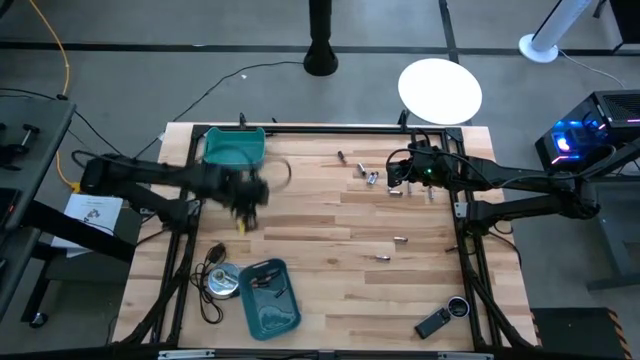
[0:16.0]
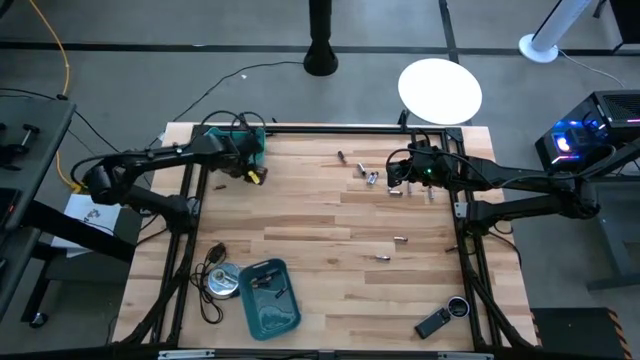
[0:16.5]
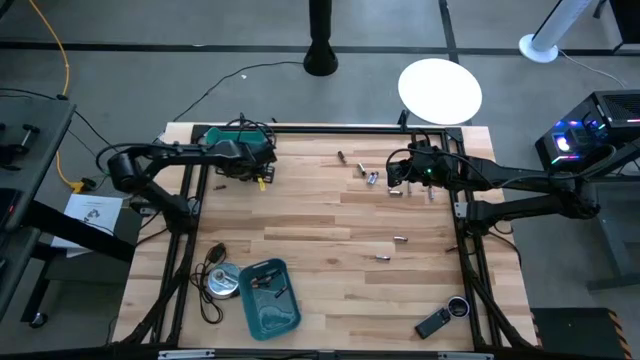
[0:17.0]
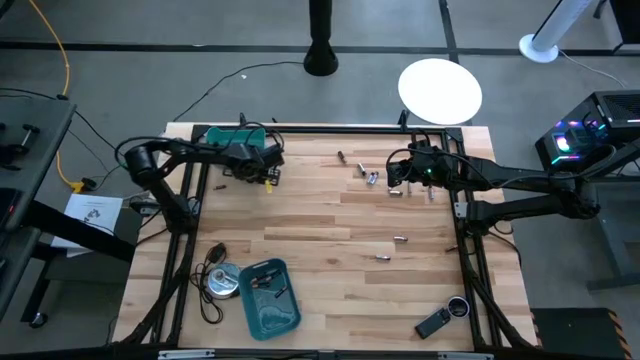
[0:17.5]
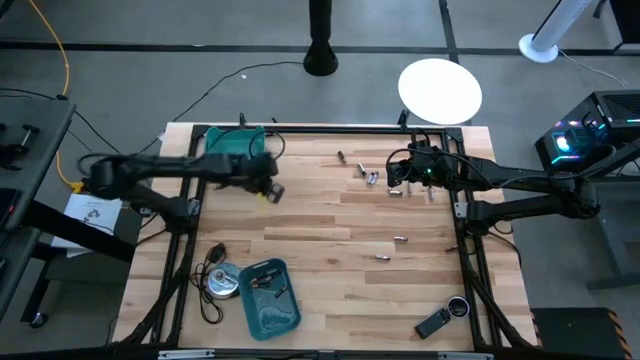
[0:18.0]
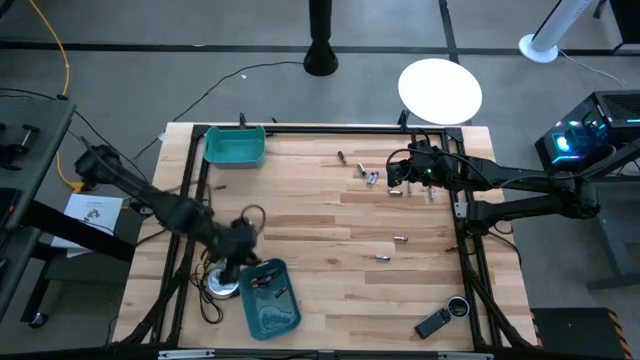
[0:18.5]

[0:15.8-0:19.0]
Task: Sort batteries
Put the black battery into the blue bin

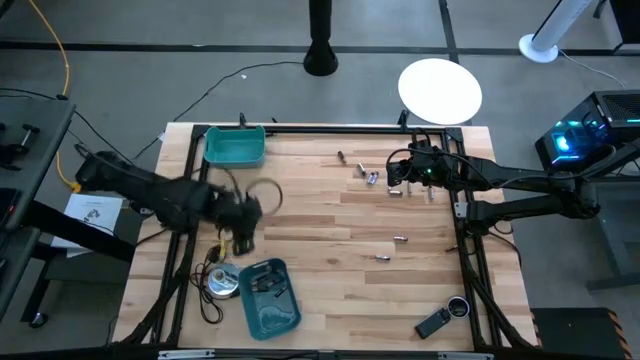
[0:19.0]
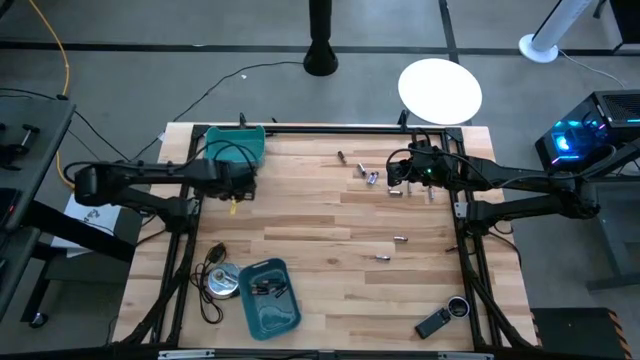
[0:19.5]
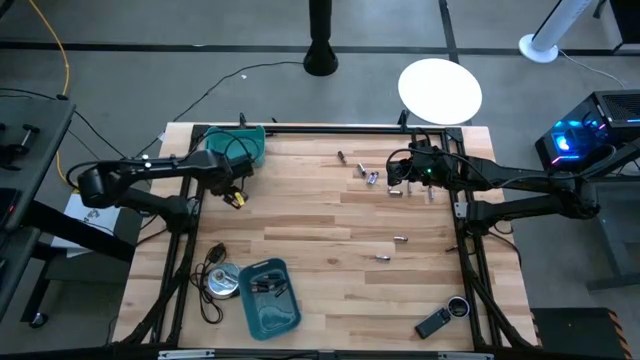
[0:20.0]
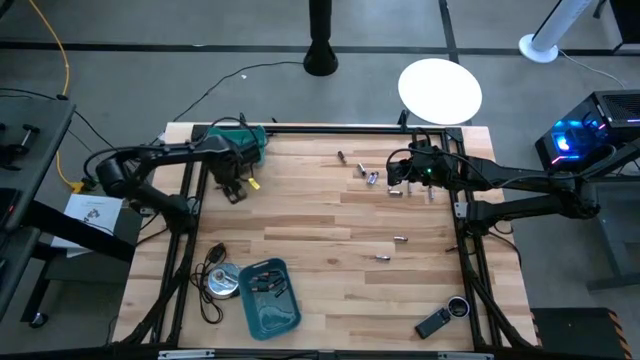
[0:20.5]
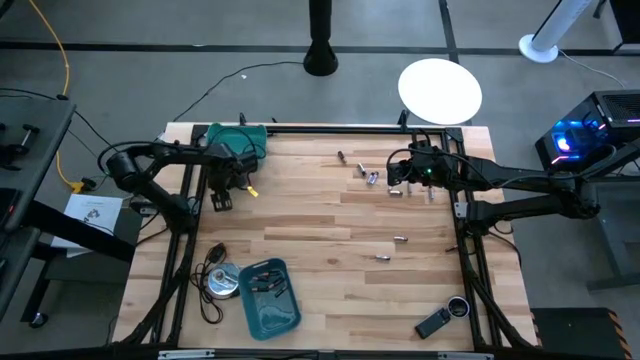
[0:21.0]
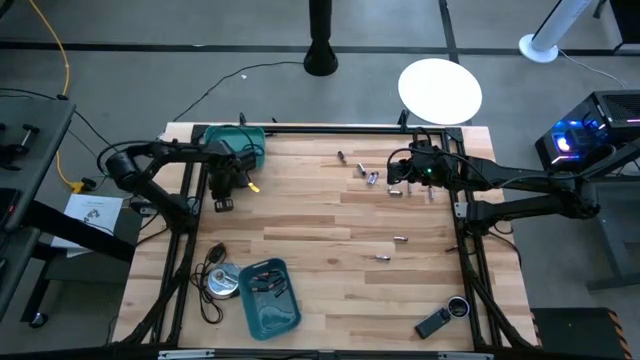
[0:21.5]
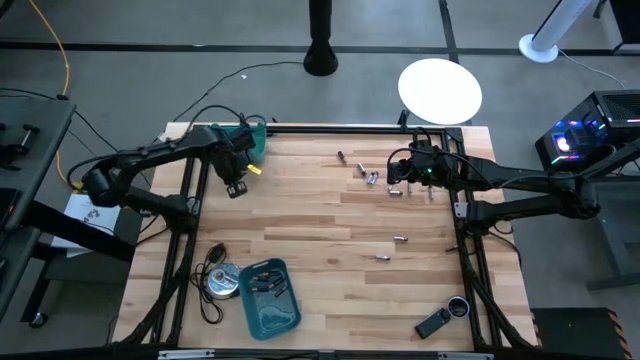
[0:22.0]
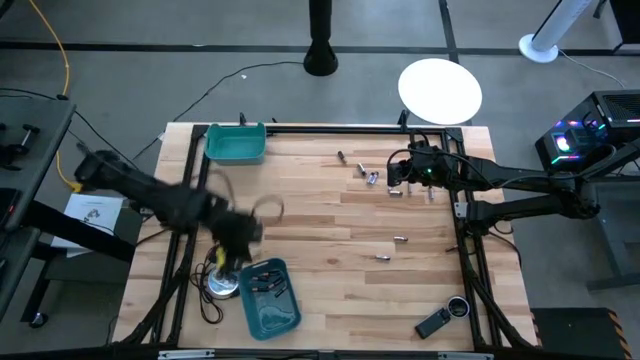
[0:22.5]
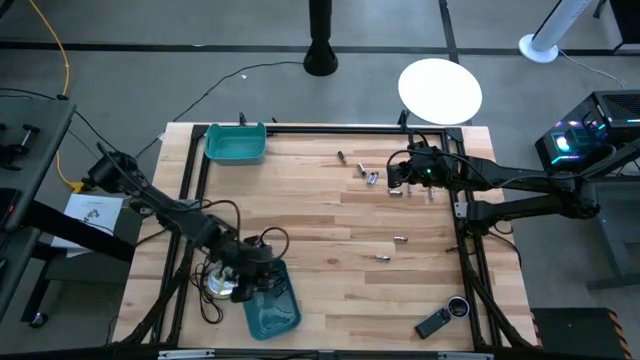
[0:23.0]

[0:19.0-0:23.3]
Put the black battery into the blue bin

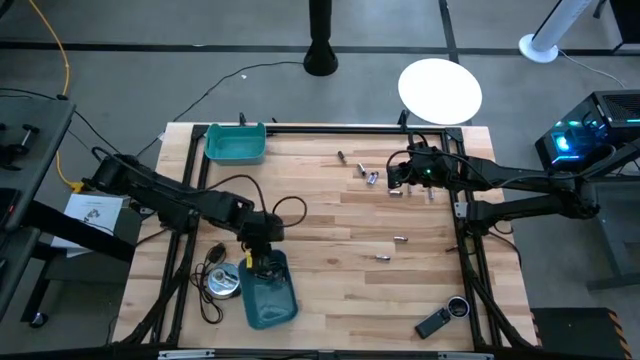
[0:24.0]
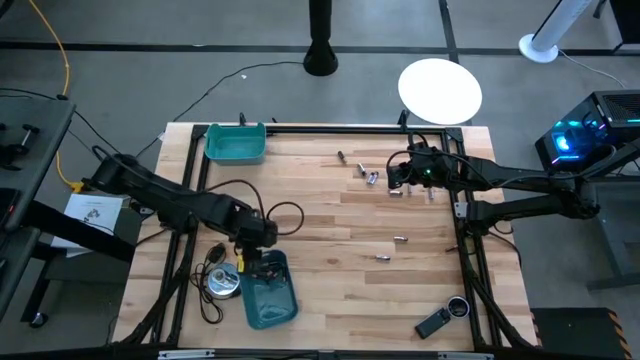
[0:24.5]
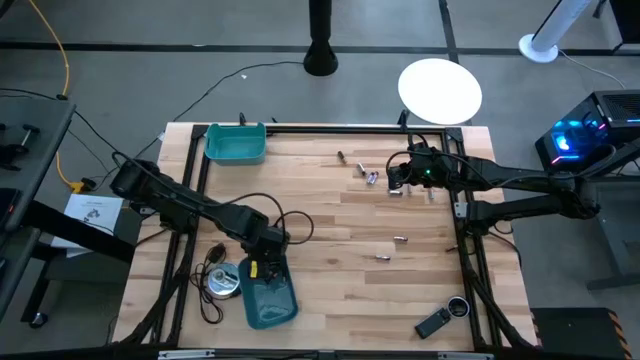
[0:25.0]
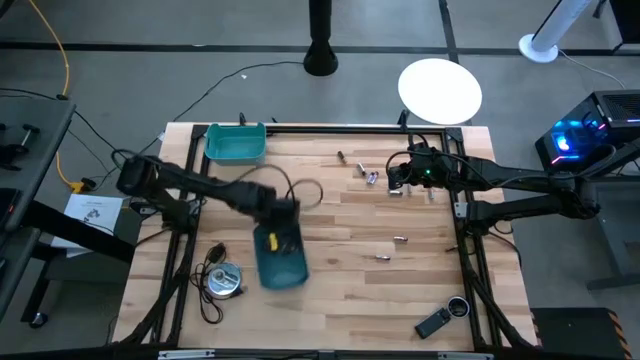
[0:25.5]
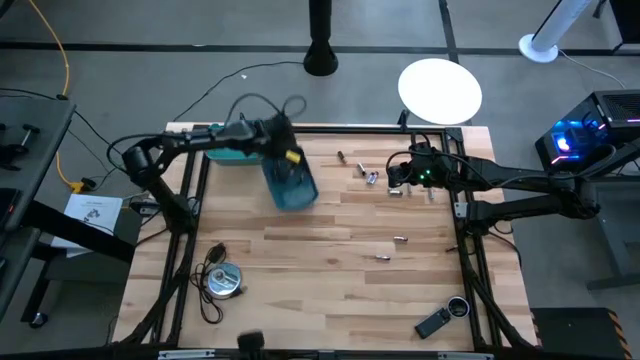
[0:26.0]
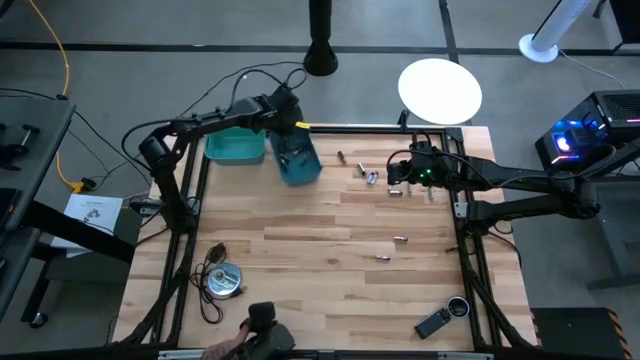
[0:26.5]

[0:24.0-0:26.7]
Move the blue bin to the top of the table

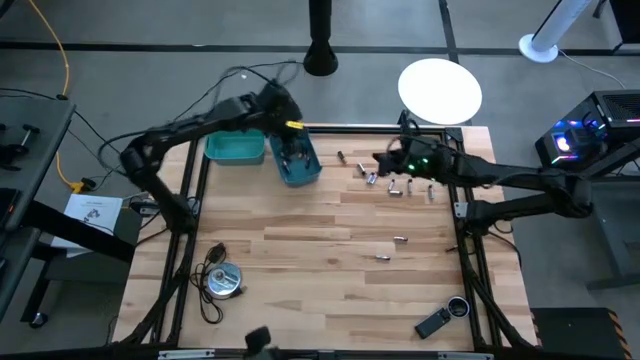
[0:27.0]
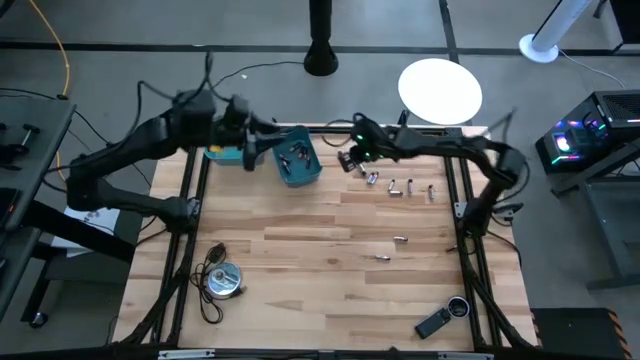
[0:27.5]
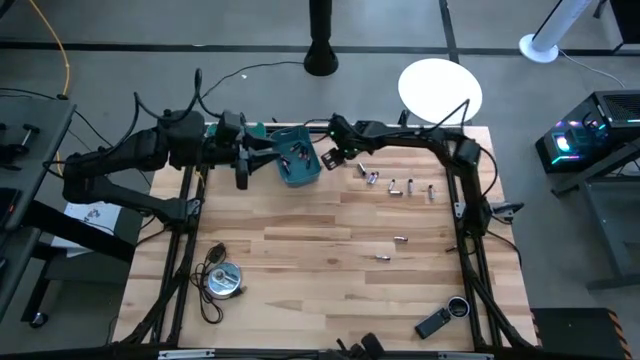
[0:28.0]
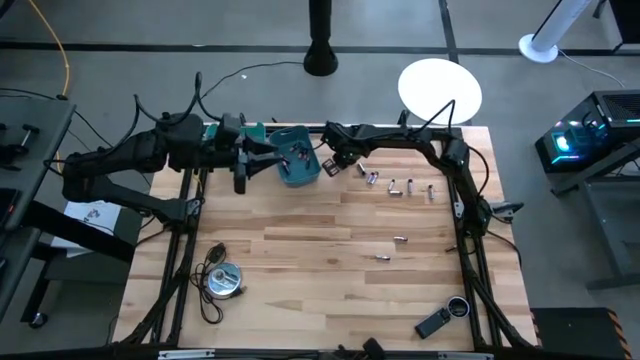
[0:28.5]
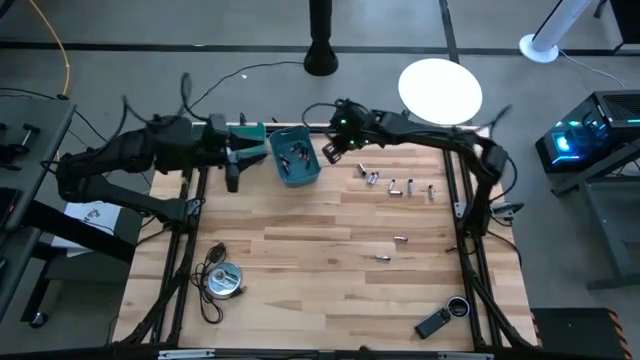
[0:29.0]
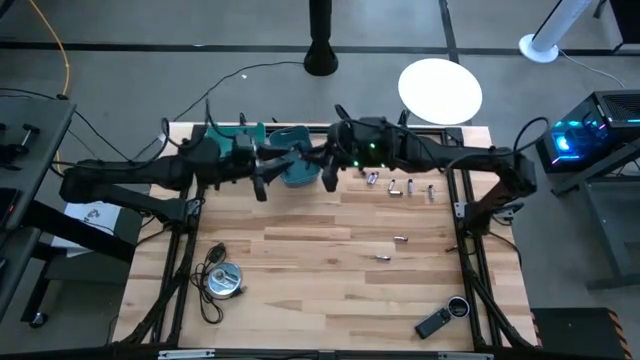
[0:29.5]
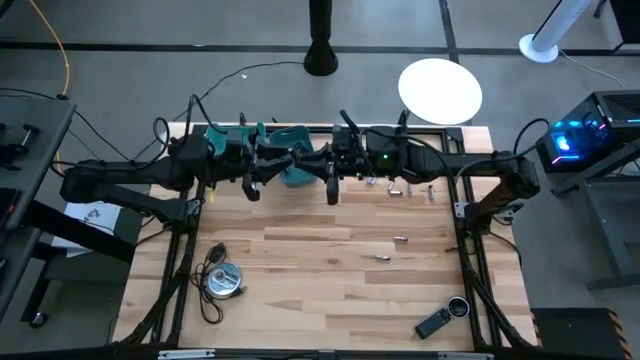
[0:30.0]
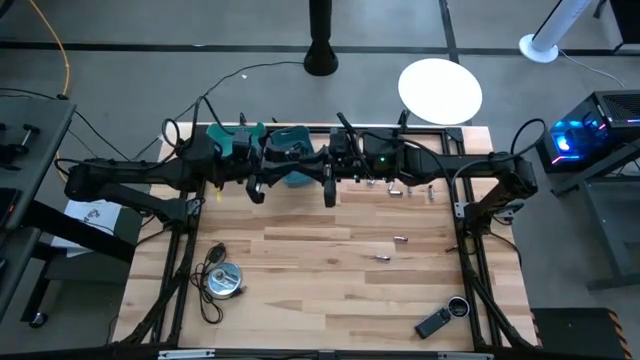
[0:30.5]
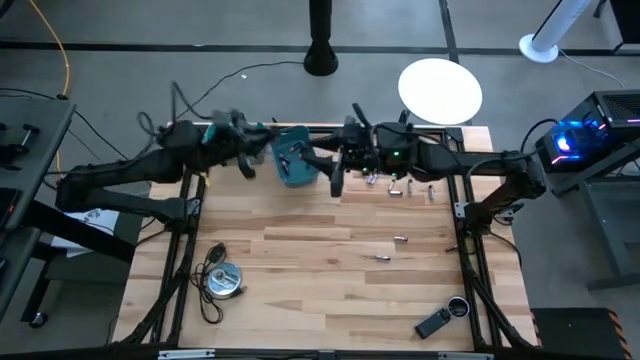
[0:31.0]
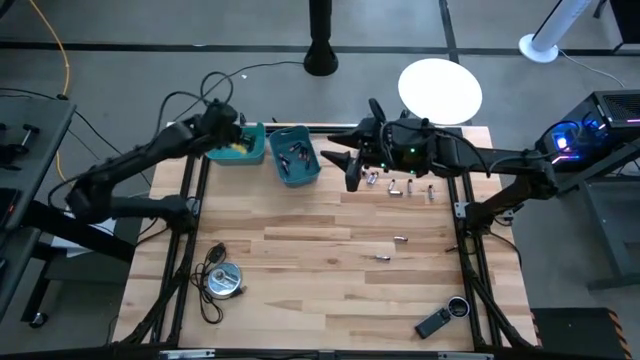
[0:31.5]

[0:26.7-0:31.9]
Put the black battery into the green bin

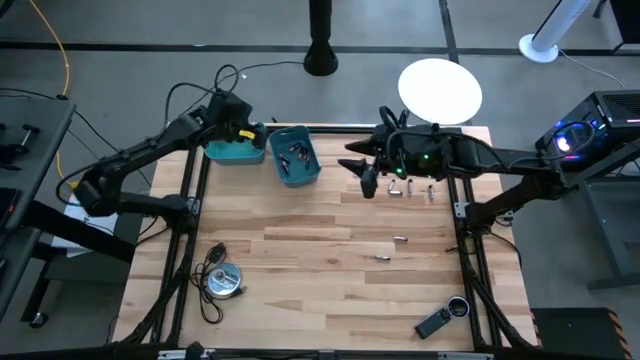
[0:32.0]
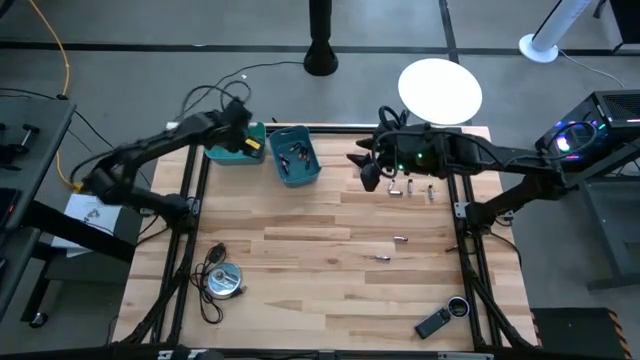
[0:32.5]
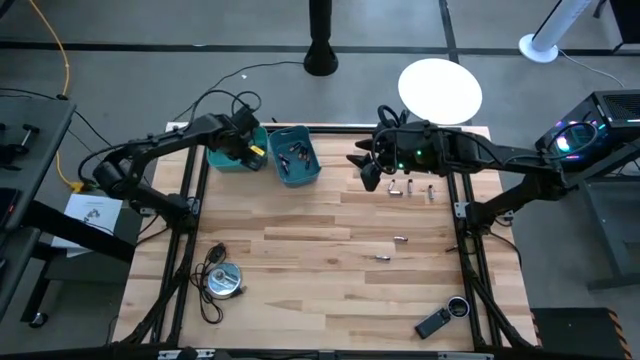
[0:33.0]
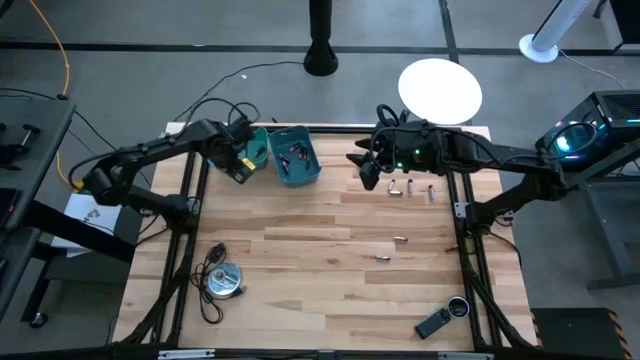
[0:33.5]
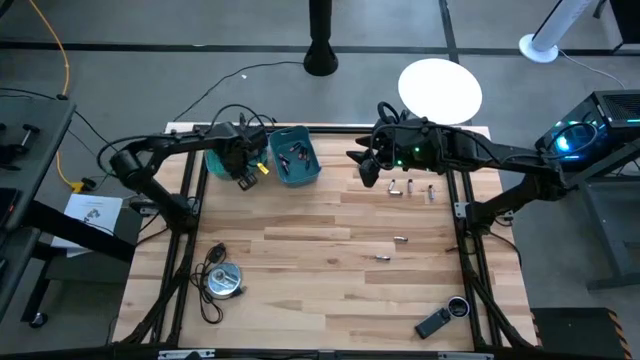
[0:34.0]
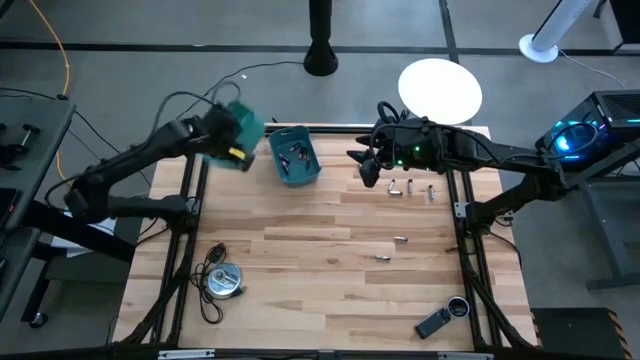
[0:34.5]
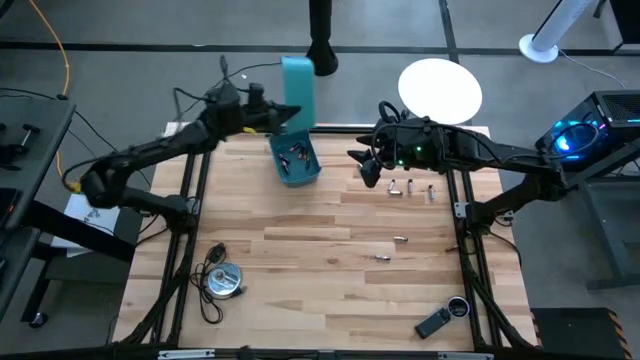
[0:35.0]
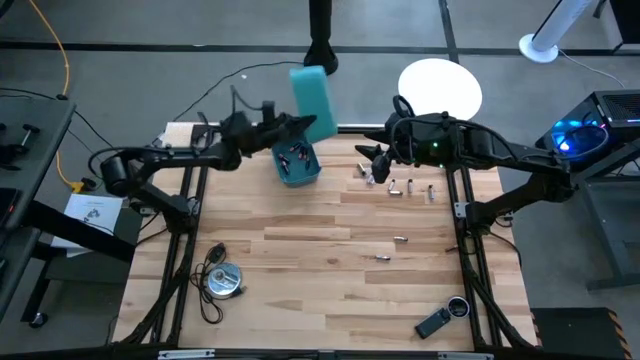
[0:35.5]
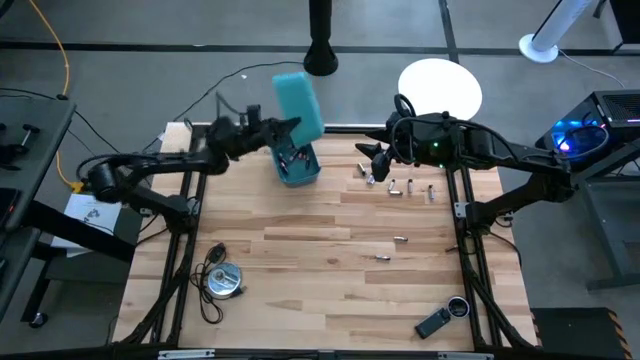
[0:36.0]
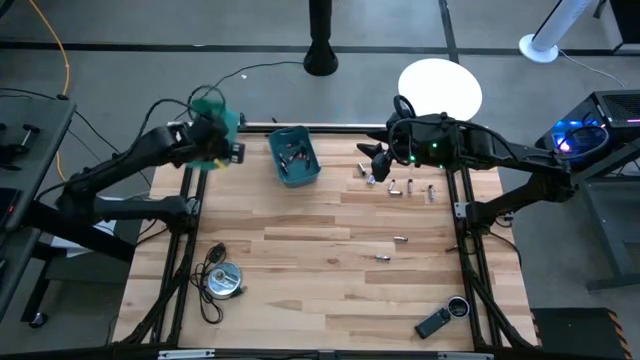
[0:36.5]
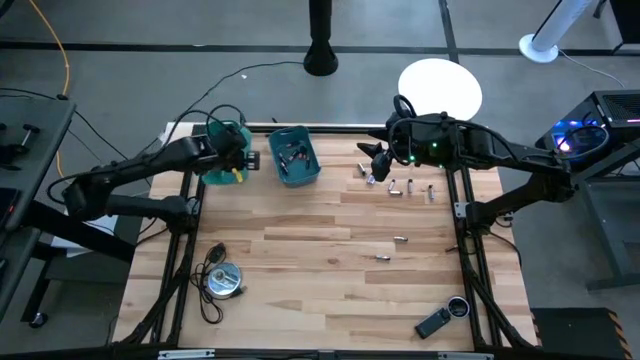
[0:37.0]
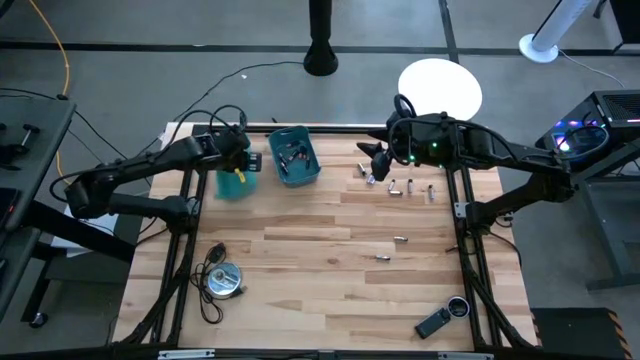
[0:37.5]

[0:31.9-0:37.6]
Remove the black battery from the green bin and place it in the blue bin
